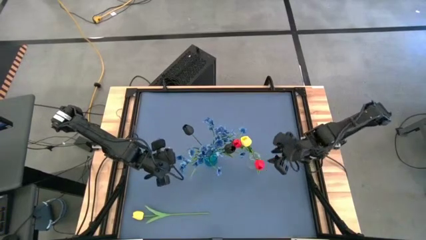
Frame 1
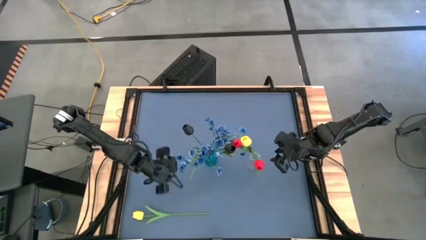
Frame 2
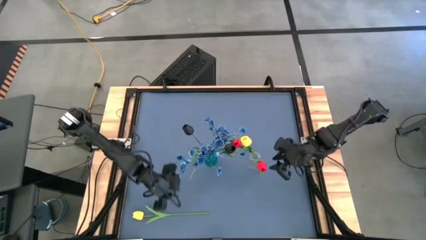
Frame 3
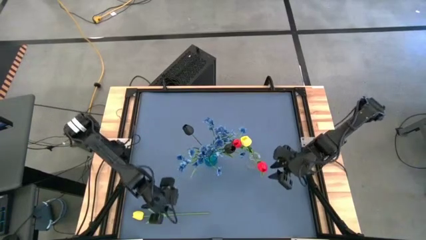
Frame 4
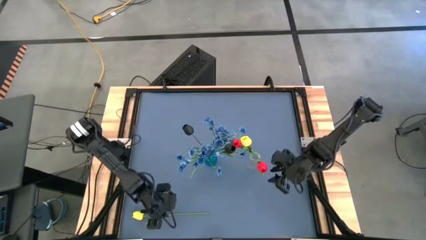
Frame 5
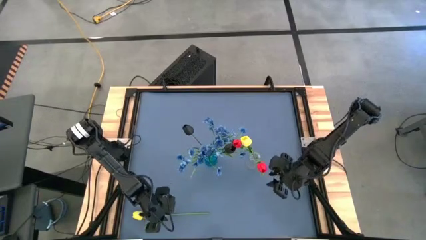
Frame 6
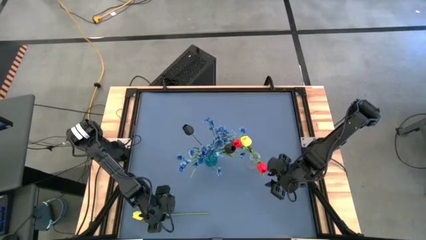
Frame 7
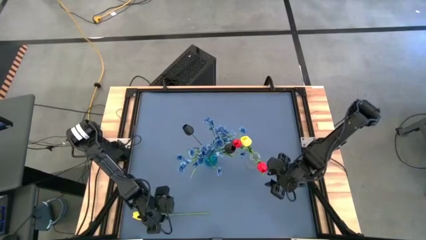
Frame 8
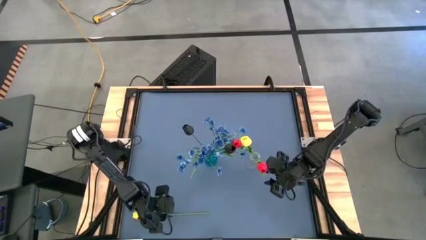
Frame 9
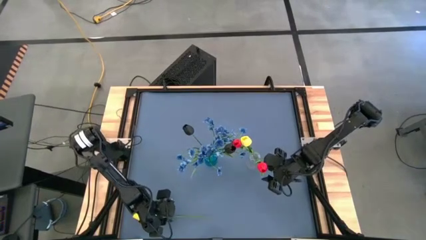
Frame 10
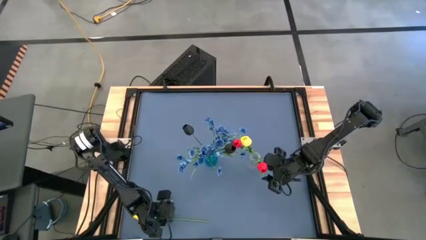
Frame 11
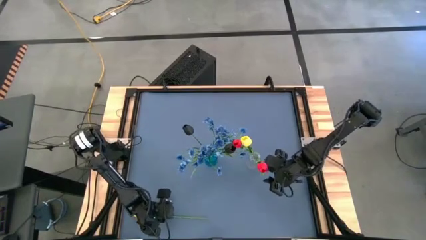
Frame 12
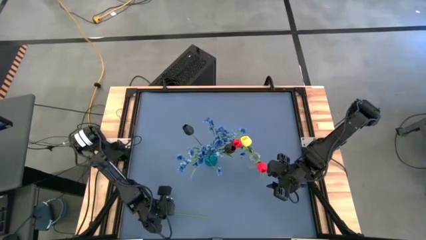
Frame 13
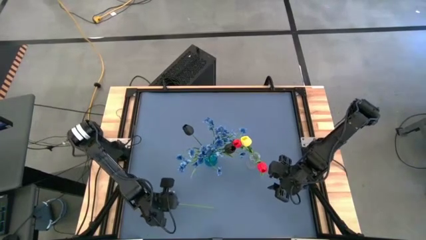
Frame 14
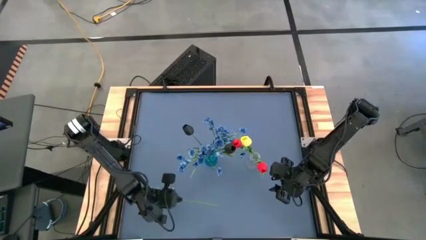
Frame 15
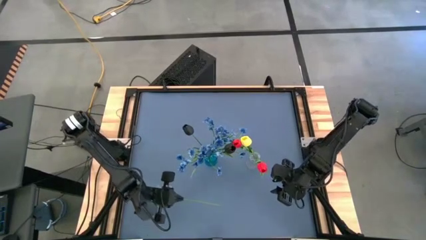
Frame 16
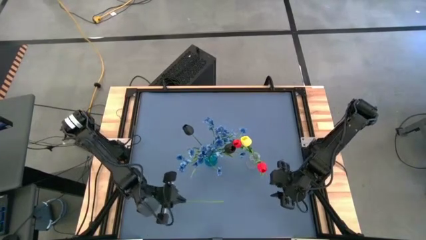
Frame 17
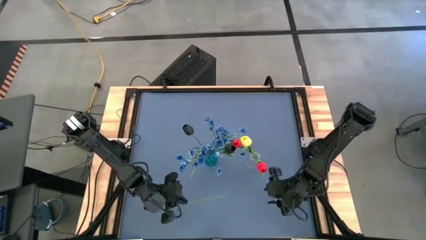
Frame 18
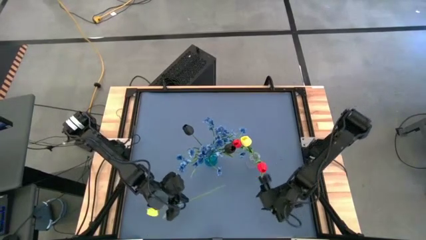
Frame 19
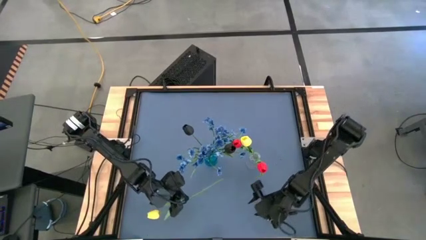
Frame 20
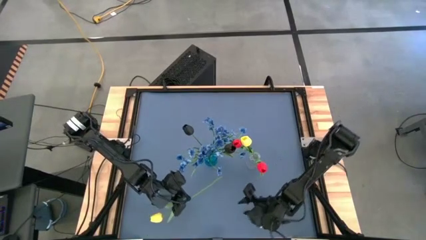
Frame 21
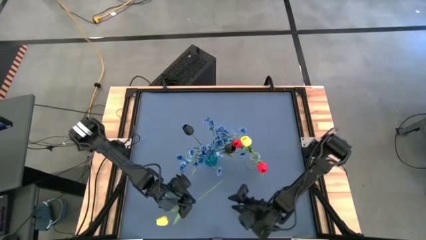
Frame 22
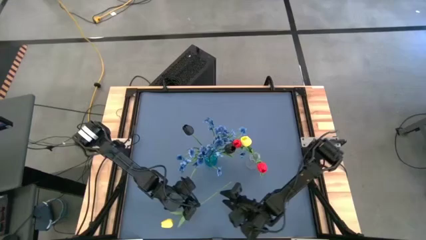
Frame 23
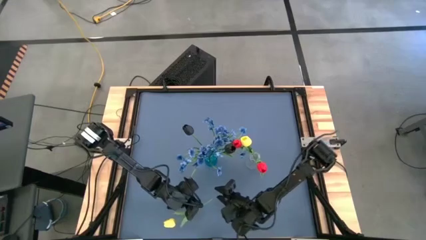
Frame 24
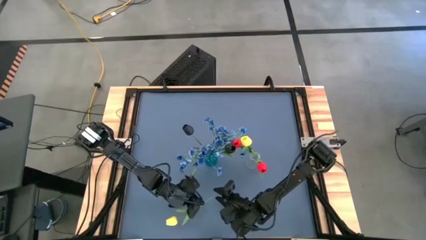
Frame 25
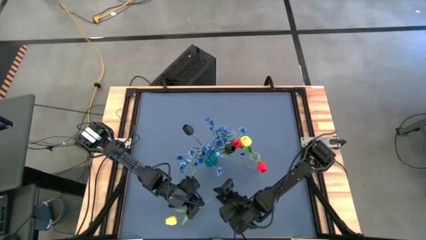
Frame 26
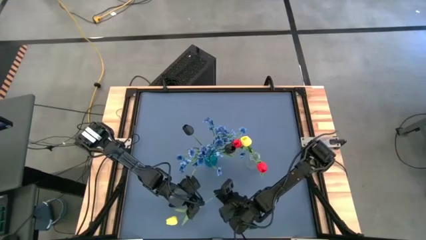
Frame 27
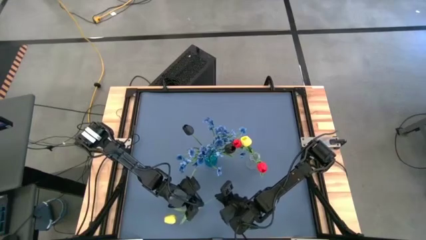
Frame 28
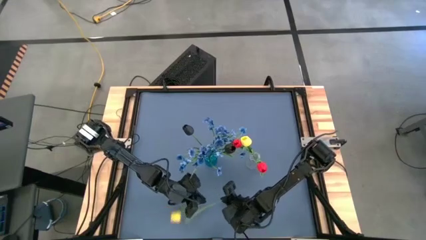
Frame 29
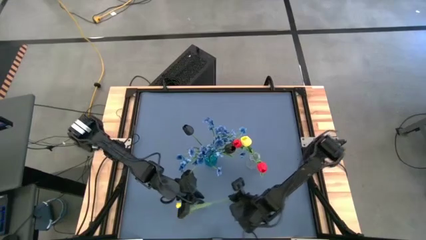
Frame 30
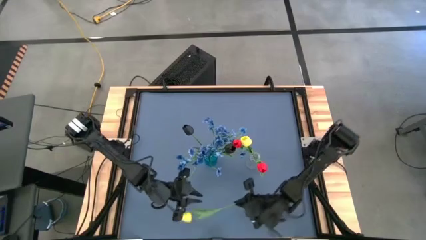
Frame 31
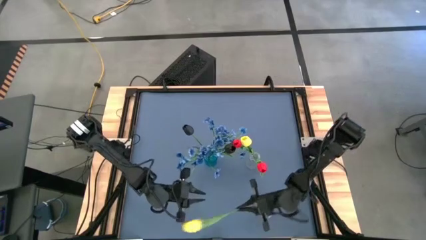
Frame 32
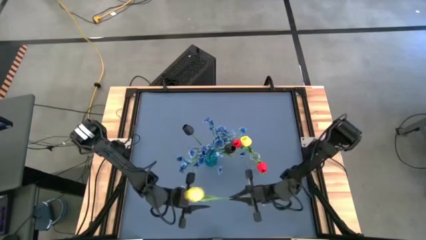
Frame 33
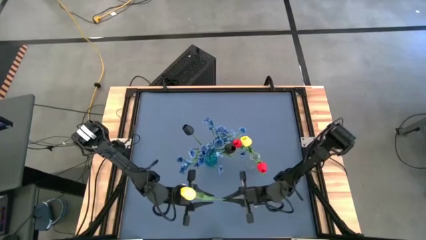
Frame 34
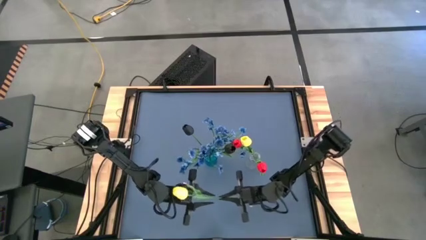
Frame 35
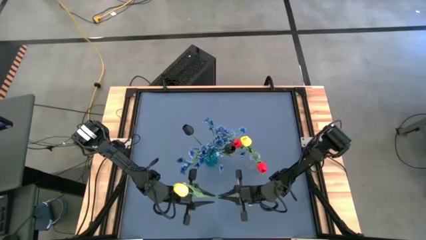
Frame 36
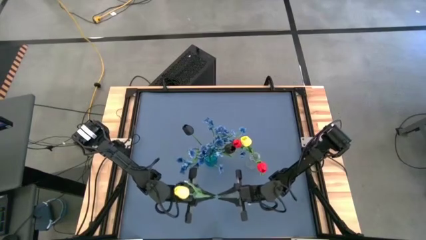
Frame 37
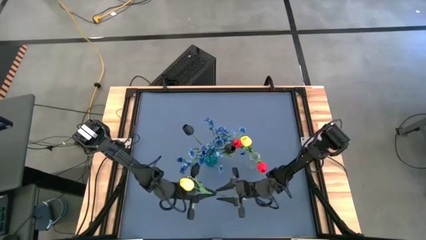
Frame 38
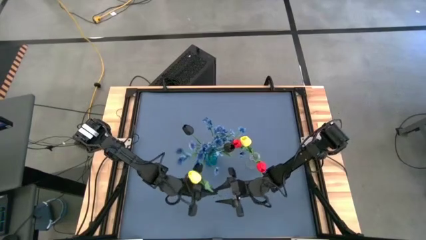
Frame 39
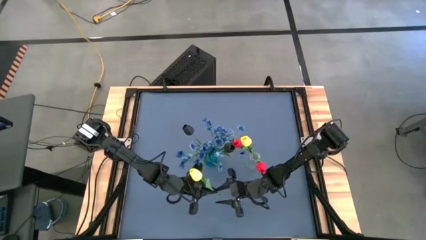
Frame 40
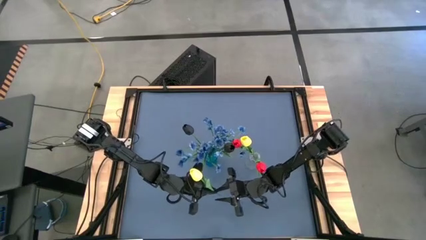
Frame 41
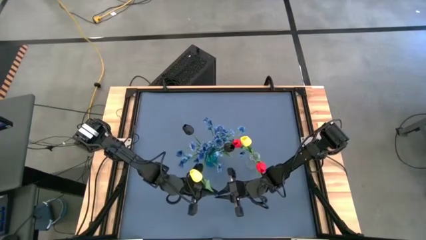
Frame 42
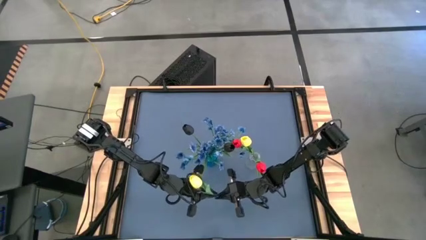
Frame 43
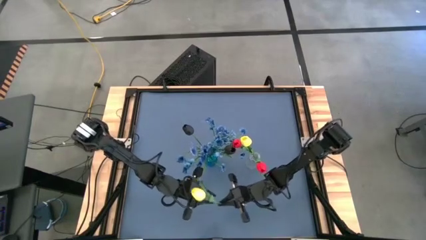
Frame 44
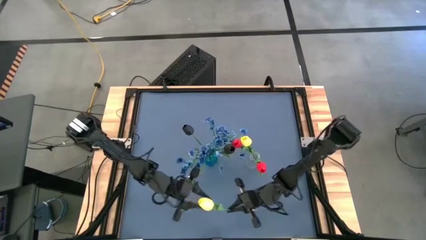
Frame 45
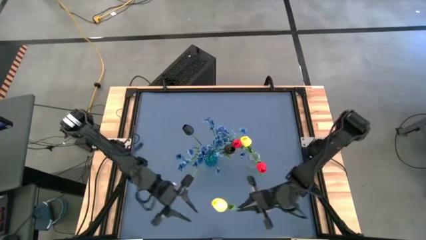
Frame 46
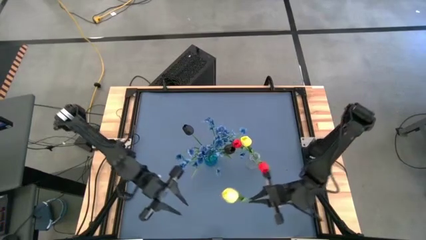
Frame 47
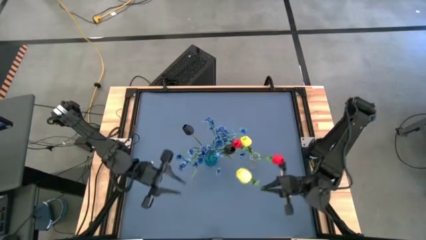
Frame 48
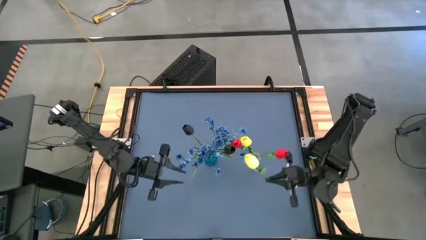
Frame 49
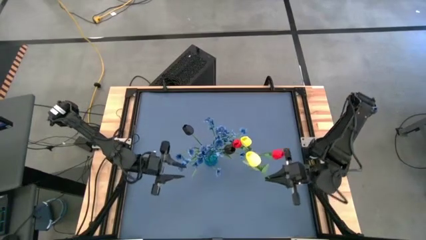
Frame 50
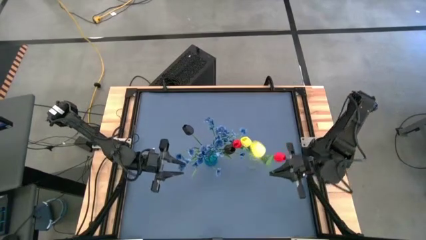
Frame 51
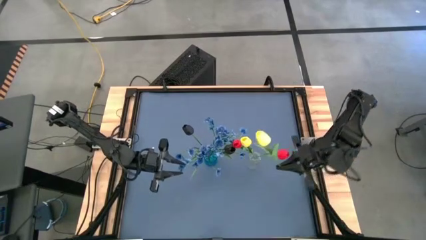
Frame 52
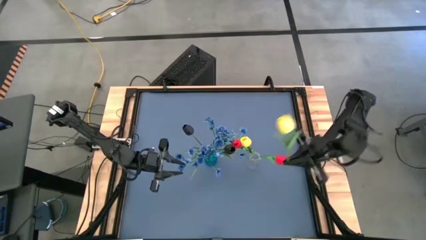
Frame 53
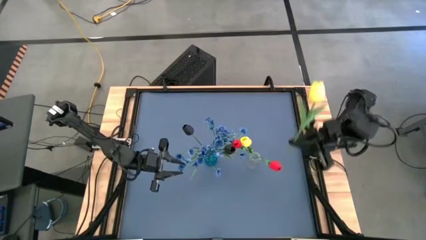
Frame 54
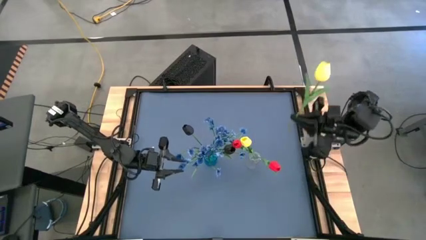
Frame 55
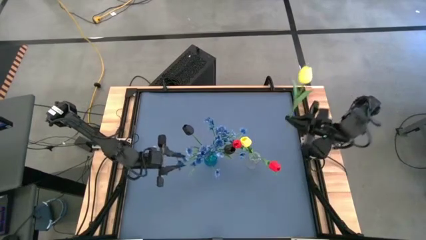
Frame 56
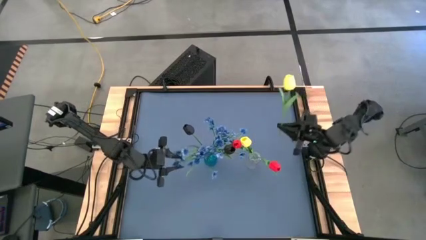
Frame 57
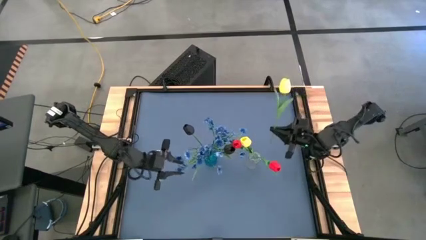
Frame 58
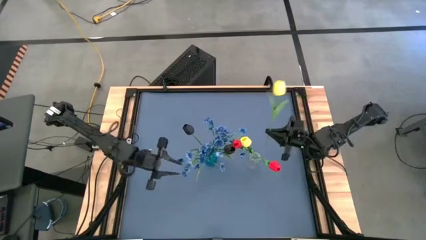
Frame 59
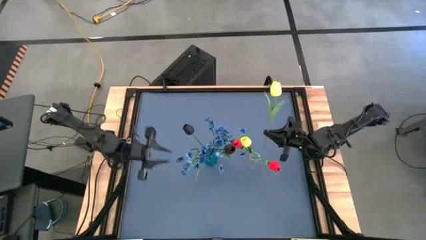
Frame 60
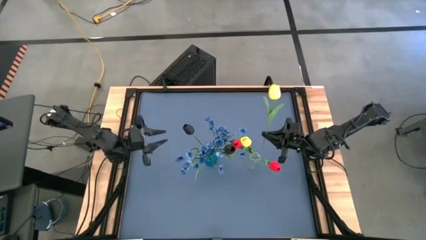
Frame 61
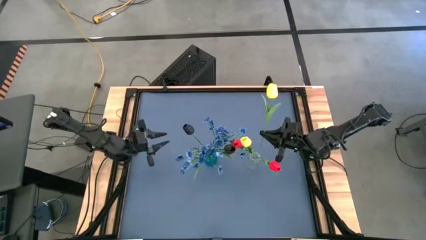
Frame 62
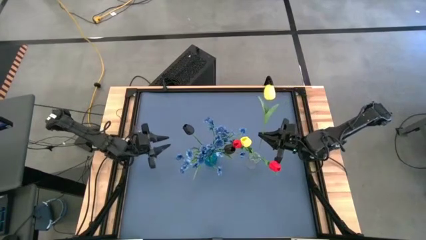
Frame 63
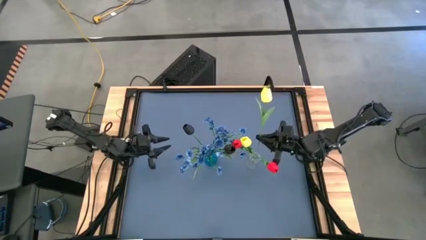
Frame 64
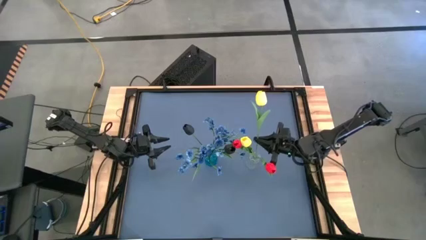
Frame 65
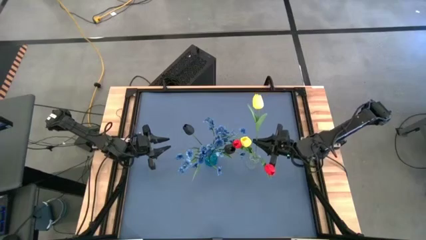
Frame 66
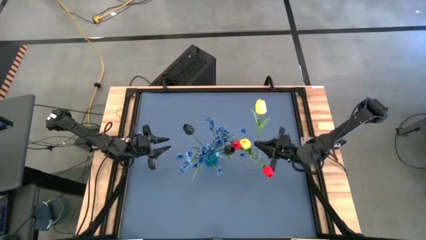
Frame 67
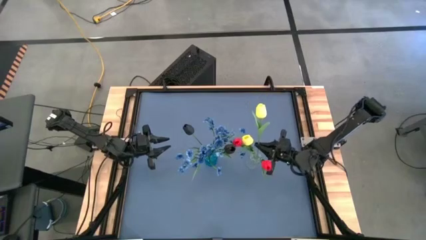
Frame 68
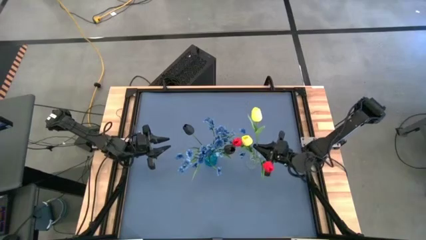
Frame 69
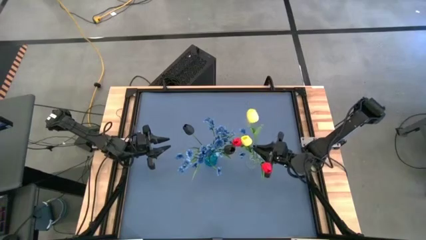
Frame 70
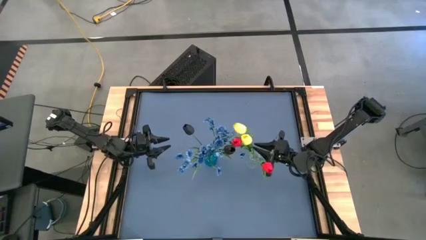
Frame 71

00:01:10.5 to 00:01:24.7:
Task: Sort flowers into vase by color
Put the yellow flower into the transparent flower vase

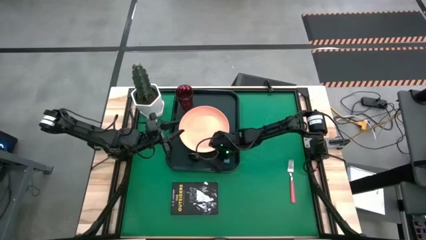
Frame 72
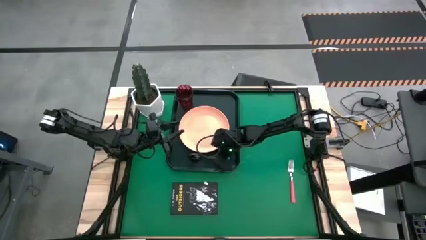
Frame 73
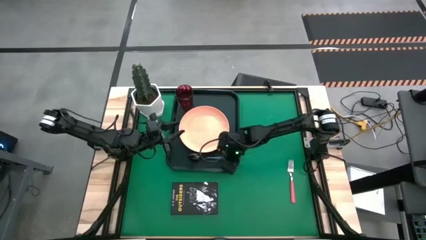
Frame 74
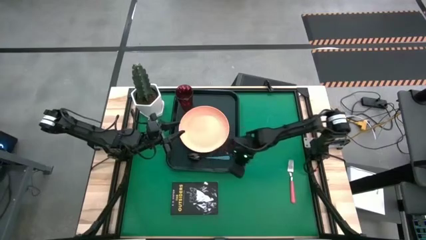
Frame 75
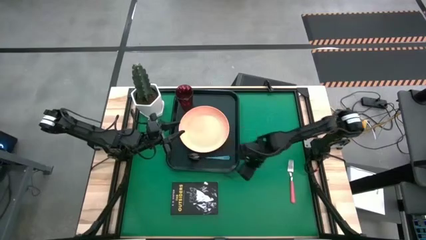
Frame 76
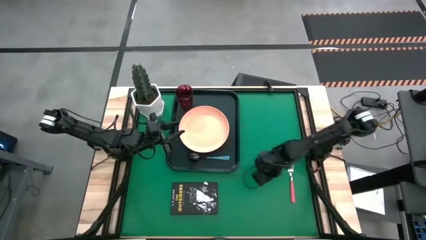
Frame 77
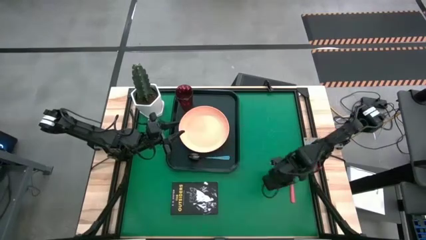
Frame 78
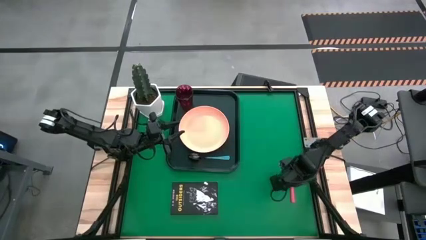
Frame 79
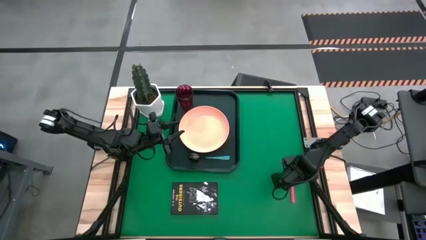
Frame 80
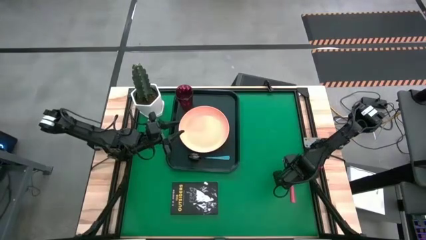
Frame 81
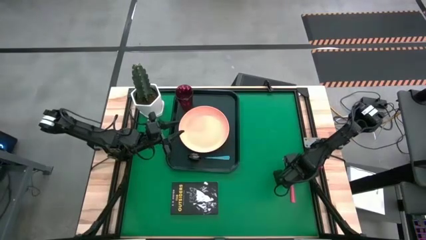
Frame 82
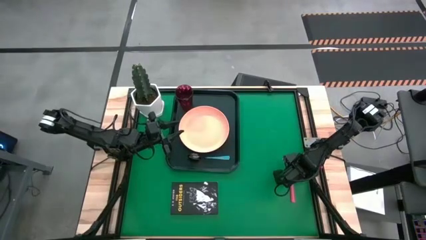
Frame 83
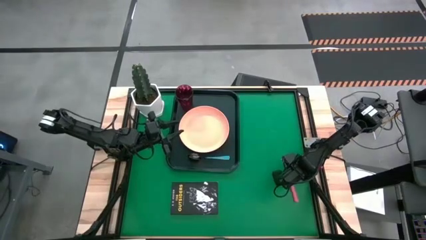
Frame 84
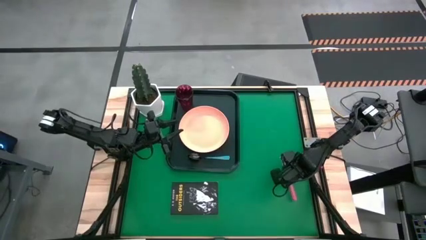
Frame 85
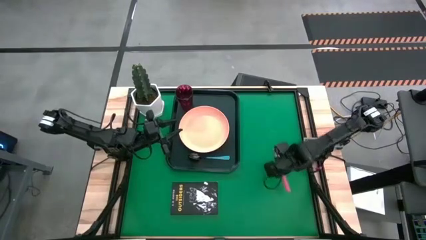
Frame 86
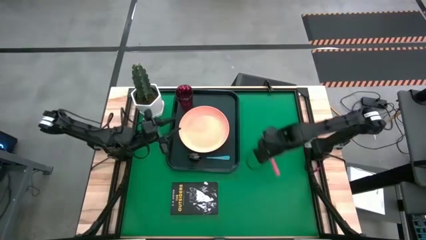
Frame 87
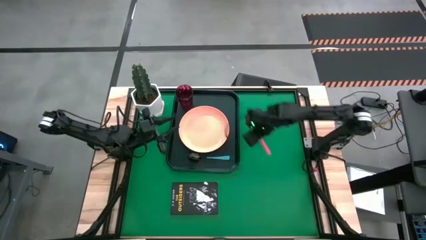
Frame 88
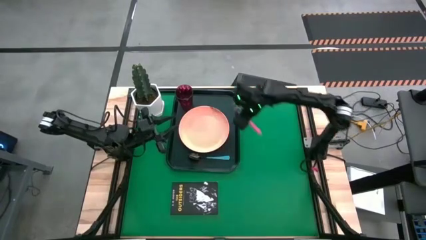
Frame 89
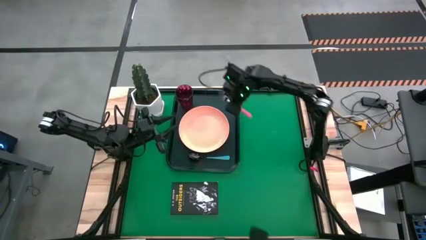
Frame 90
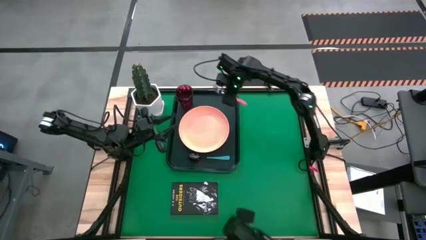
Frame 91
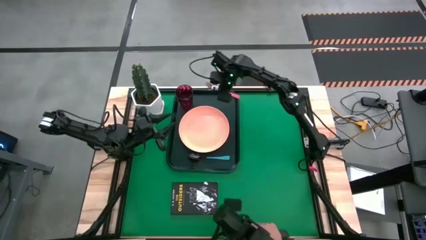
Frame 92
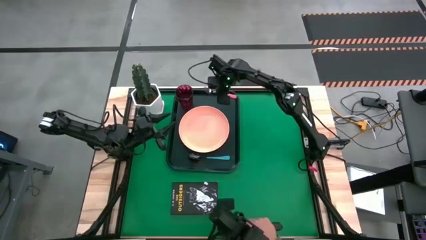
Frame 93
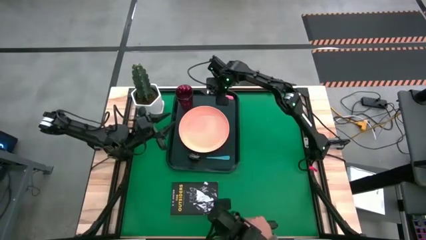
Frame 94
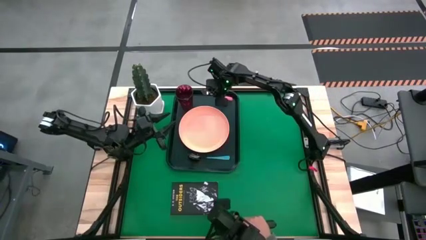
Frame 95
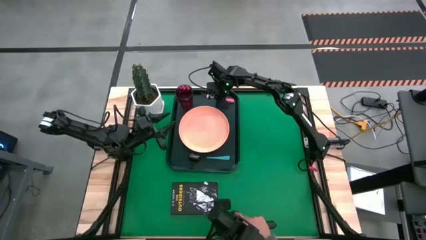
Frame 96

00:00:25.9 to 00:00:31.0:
Task: Pick and place plate/cup/fork/spoon on tray
Put the pink fork on the black tray above the orange plate
